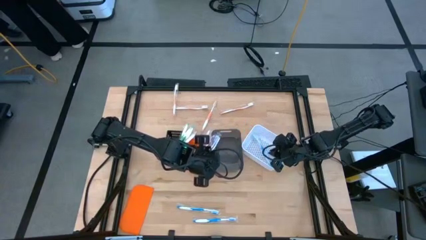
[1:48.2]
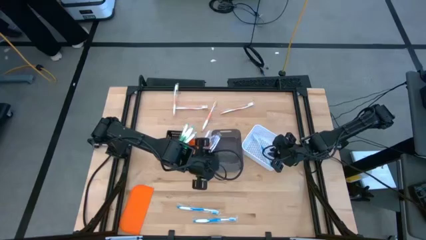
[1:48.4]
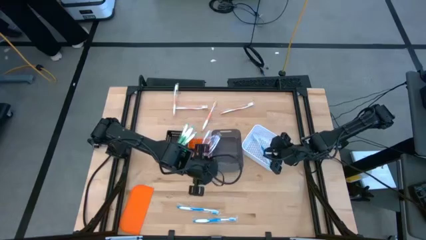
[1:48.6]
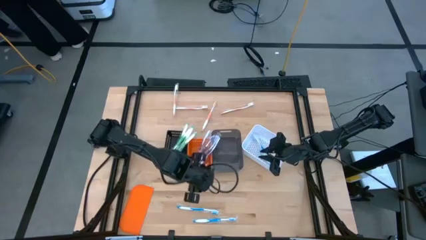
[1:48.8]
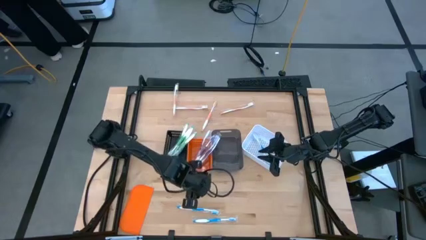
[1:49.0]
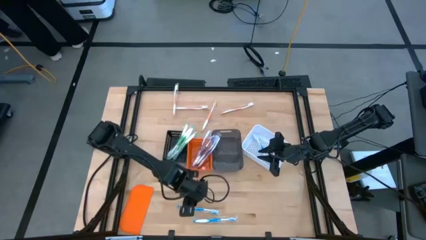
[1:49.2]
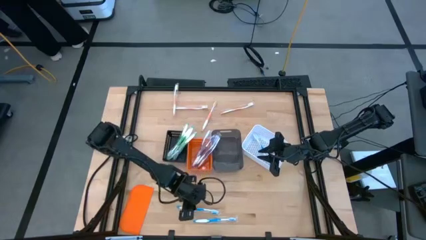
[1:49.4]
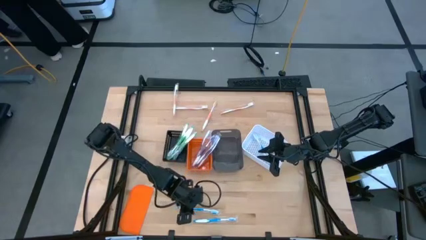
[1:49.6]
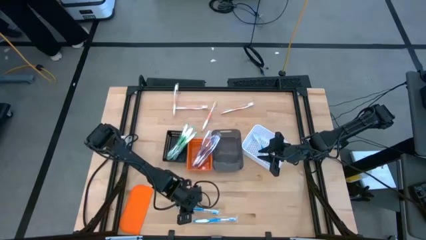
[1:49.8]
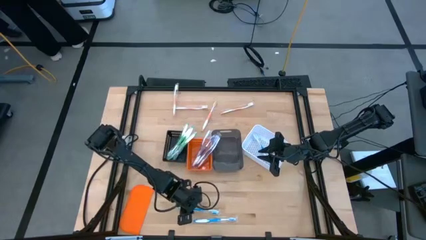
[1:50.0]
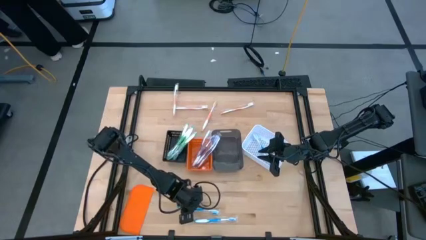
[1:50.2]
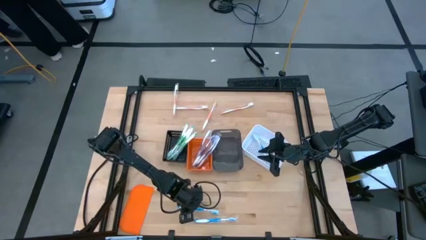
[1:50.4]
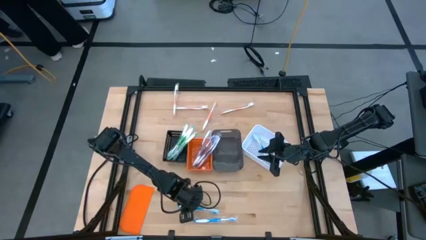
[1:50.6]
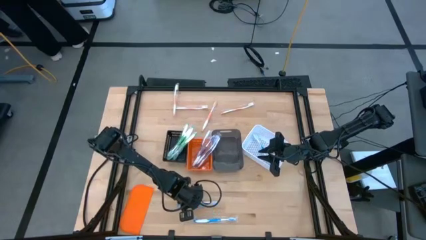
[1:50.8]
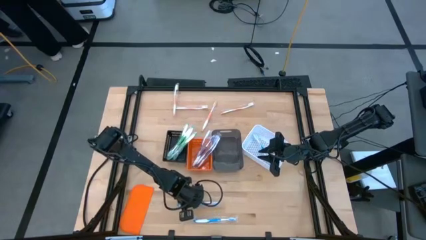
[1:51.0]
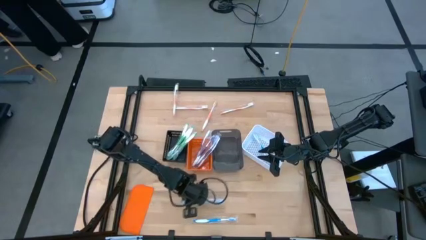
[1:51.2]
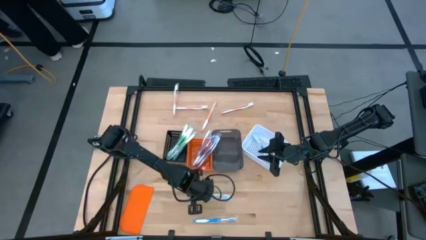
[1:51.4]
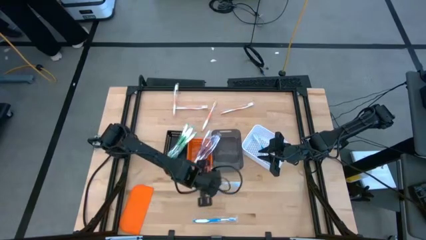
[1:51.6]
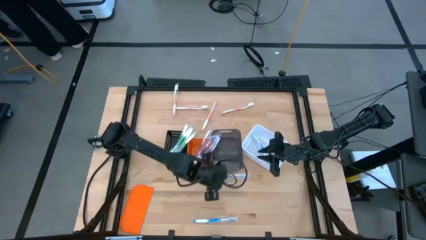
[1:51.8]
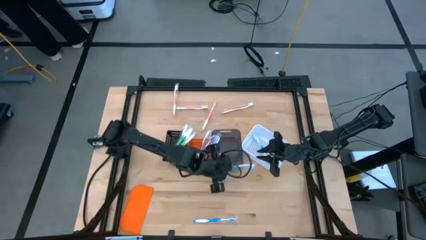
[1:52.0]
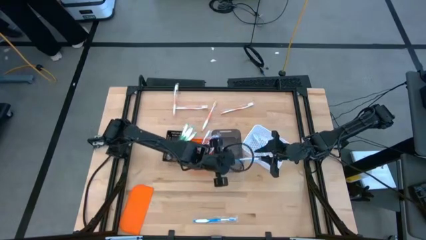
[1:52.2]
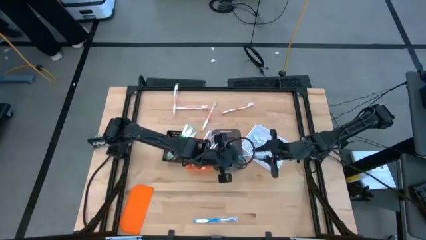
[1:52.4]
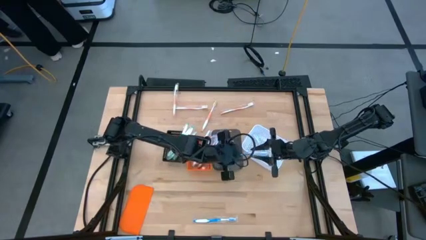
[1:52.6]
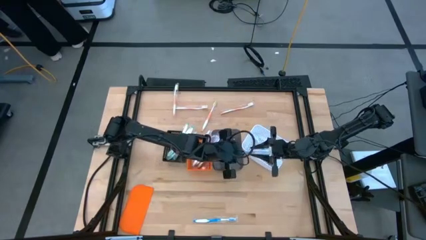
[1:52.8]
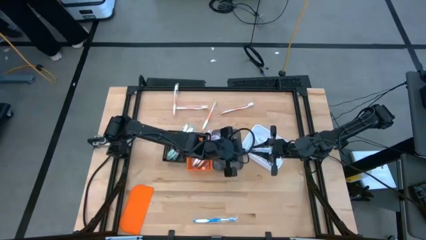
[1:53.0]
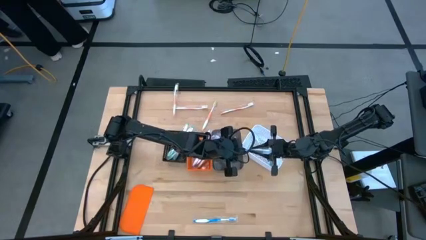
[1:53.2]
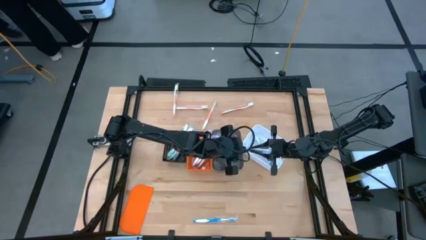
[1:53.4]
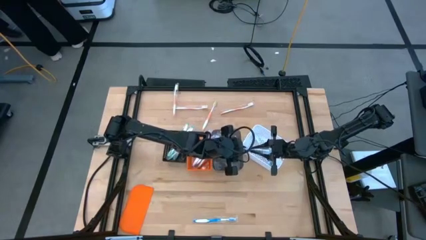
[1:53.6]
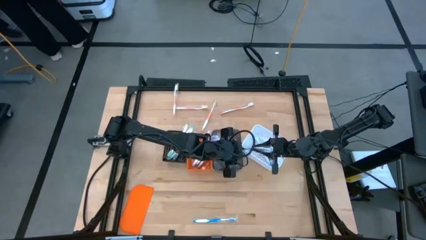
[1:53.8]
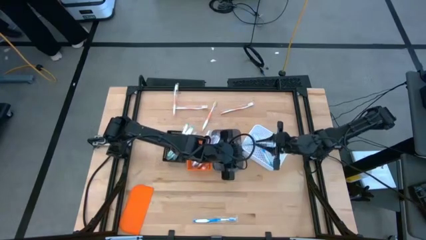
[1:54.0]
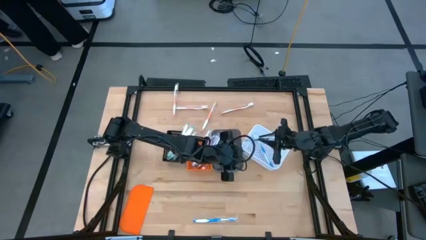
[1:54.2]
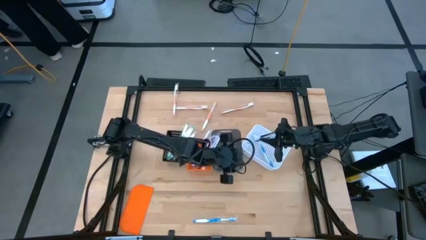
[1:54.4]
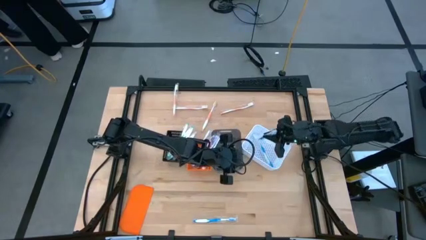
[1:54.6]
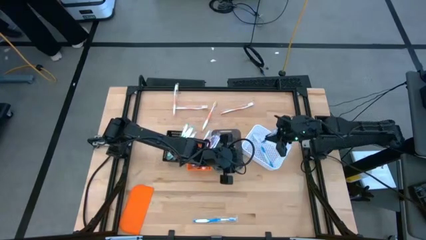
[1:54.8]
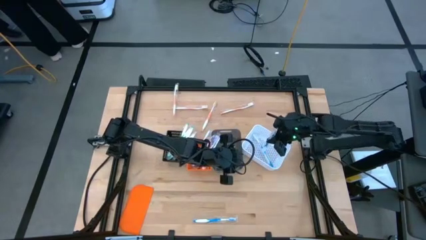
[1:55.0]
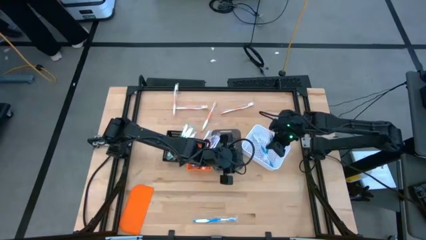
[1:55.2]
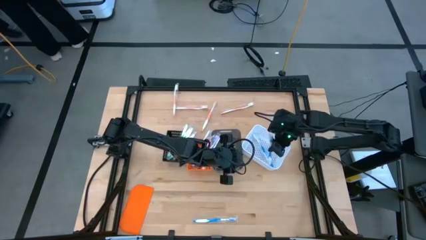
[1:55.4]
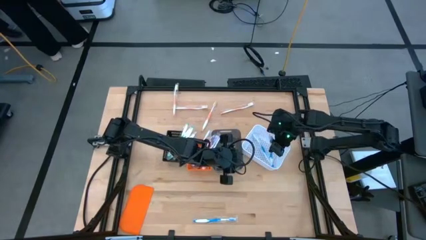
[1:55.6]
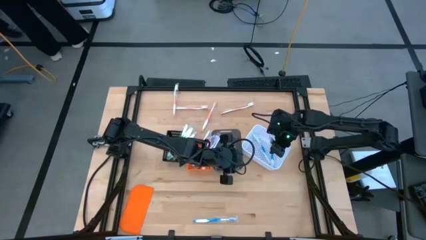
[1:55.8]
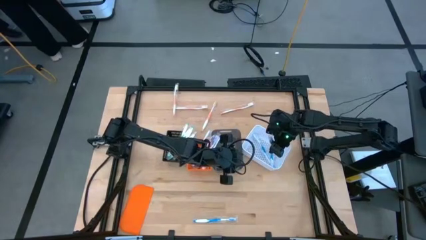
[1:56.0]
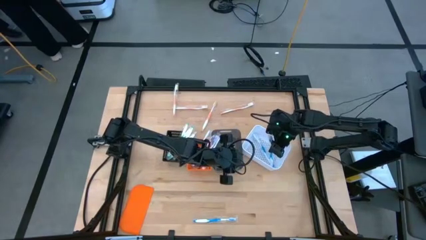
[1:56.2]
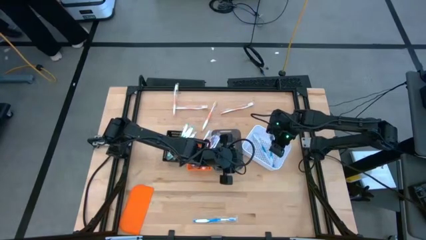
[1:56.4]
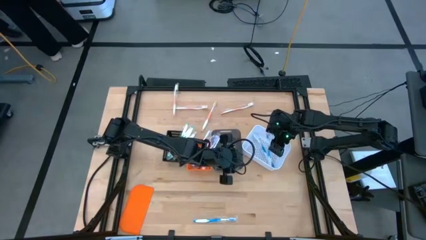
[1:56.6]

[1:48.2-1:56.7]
Task: Pick & Place Toothbrushes
Put the blue toothbrush into the white bin

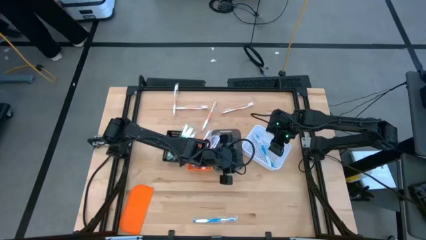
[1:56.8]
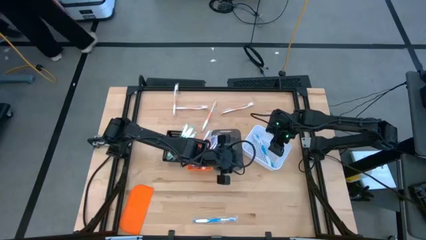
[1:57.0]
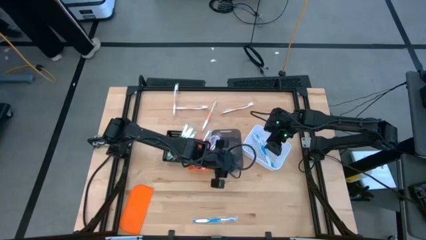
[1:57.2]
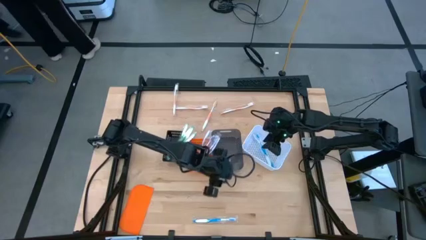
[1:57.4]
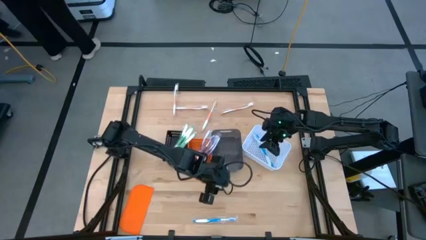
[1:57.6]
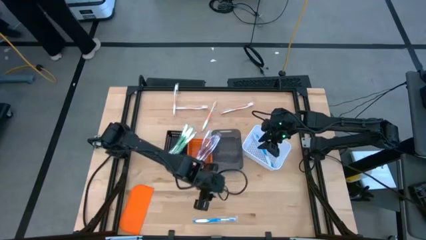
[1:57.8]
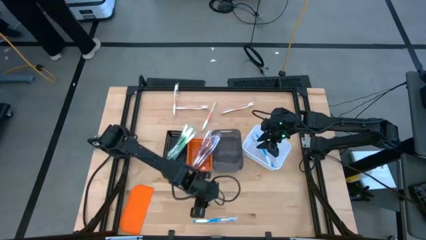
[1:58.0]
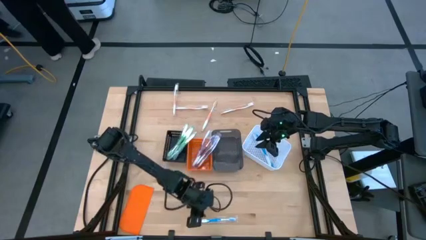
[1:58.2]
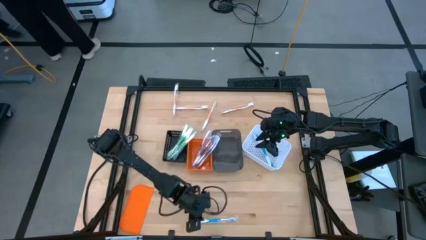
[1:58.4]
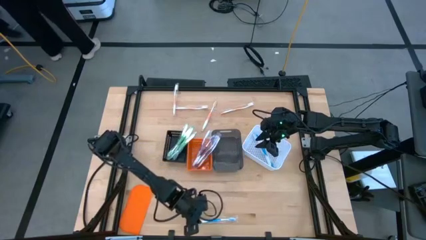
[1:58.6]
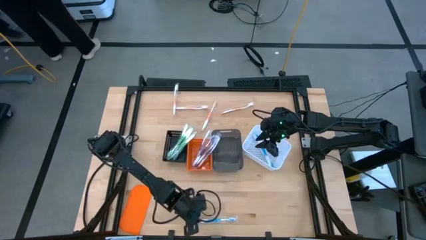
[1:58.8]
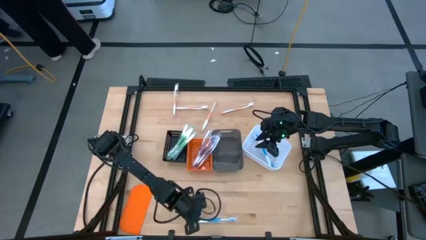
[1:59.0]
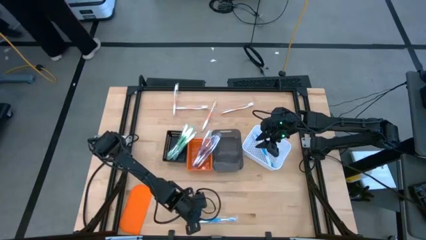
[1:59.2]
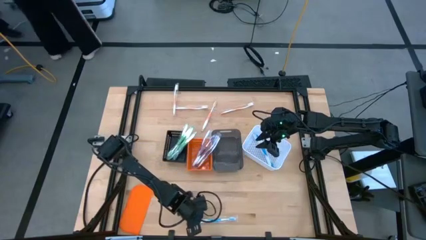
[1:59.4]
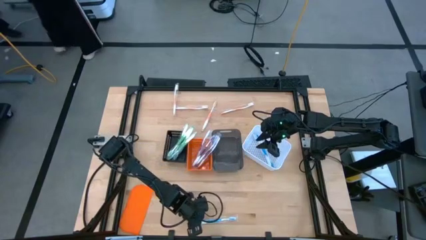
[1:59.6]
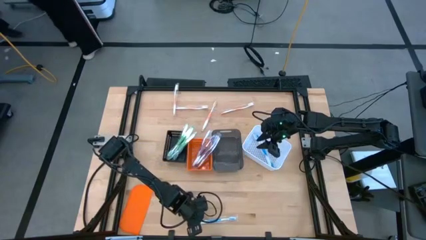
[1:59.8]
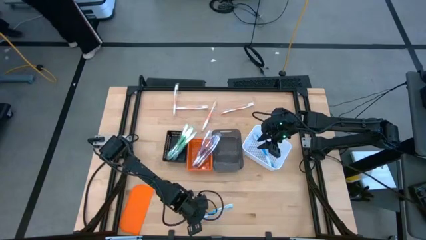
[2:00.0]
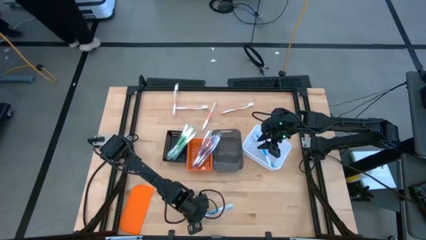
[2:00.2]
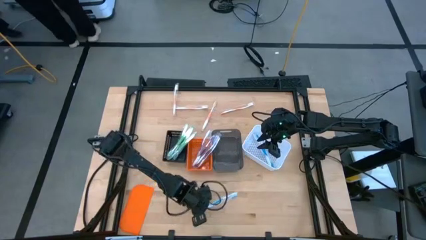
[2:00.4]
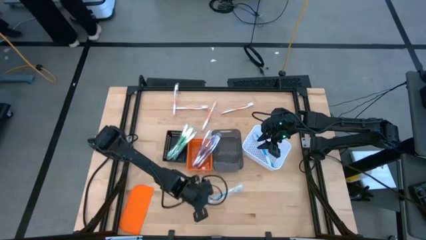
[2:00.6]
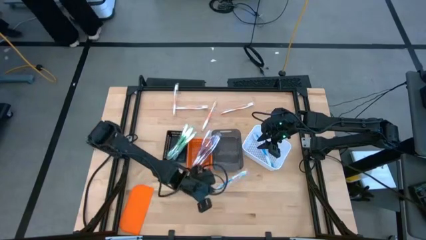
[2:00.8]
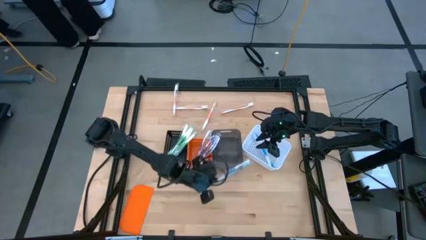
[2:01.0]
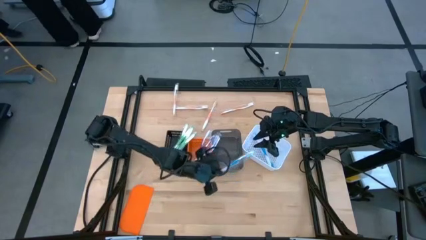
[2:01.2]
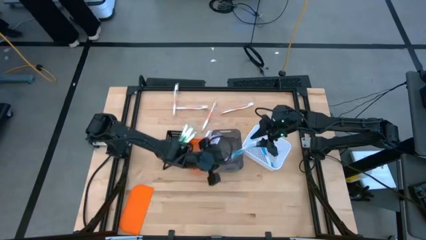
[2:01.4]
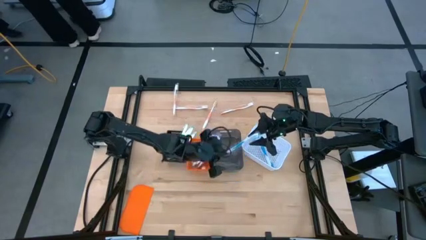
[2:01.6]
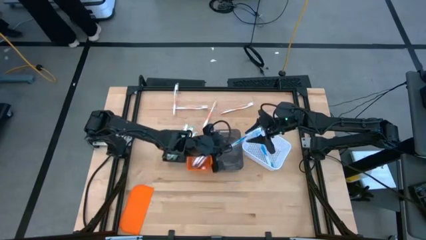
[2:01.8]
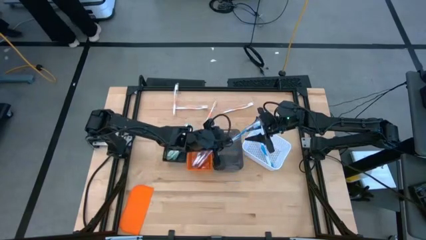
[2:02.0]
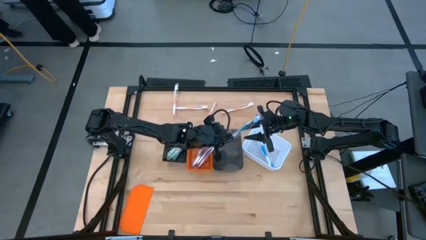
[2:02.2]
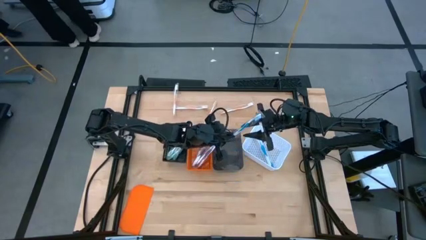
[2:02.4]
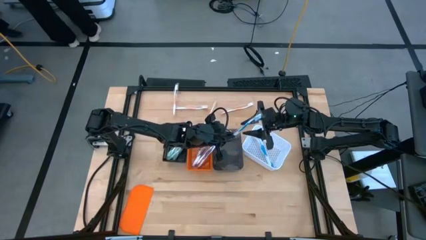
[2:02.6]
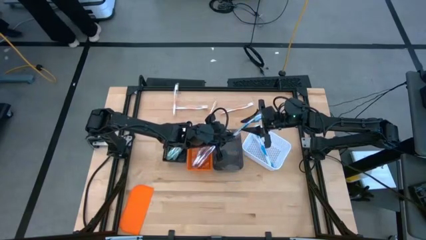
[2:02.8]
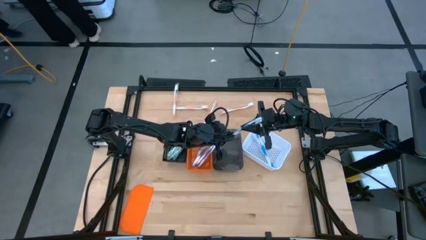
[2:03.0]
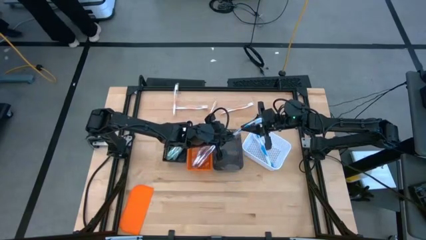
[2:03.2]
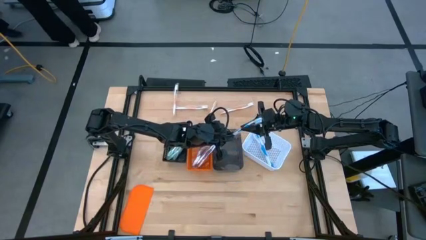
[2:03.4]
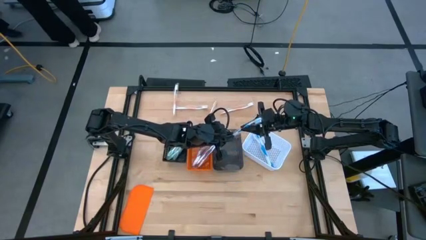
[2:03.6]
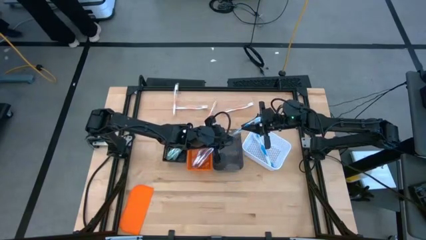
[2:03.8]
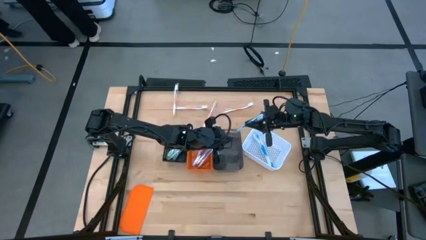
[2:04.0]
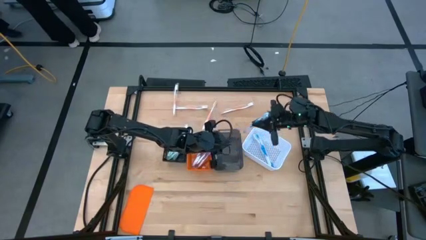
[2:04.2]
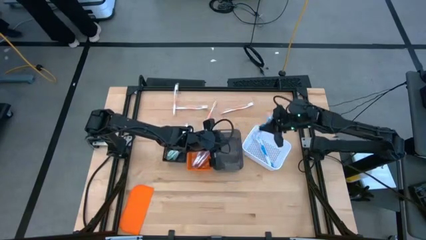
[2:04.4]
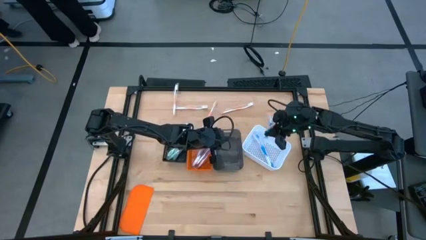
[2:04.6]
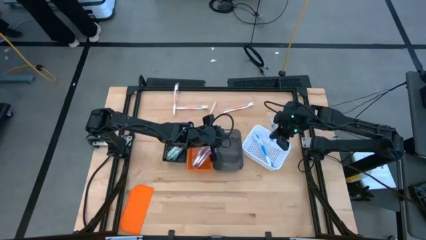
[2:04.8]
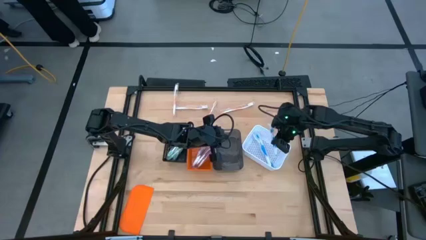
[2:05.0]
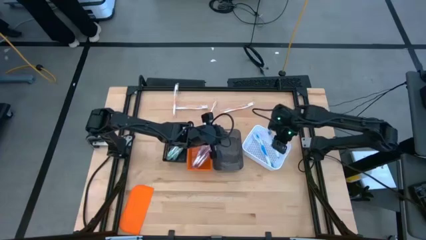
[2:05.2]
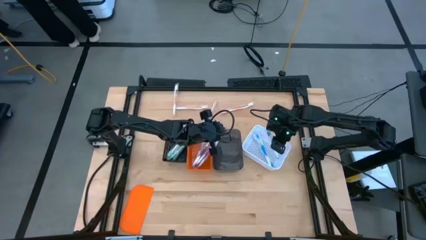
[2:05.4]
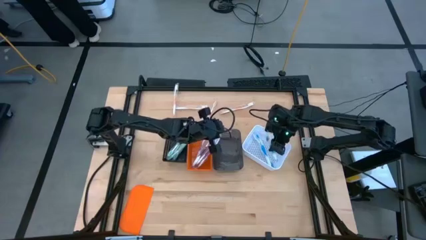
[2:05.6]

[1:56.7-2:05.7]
Put the blue toothbrush into the white bin

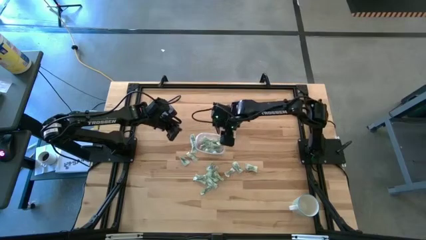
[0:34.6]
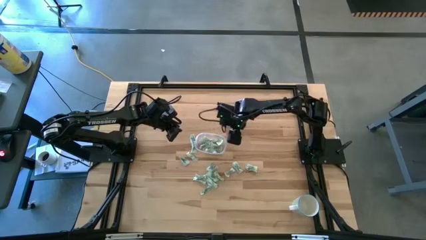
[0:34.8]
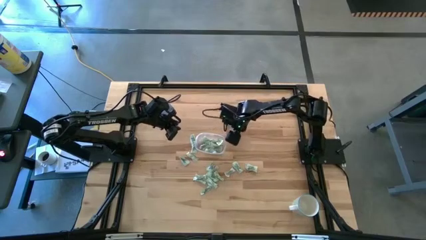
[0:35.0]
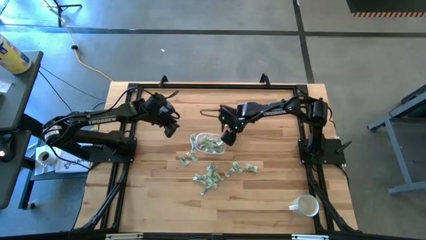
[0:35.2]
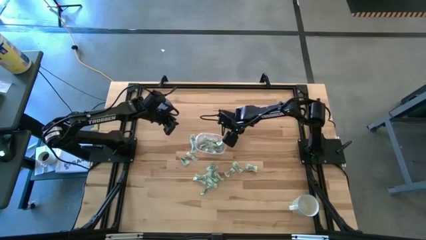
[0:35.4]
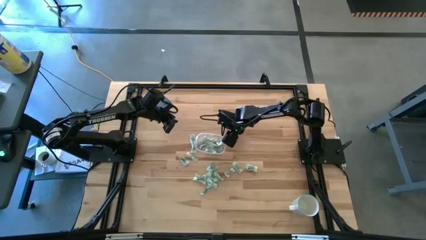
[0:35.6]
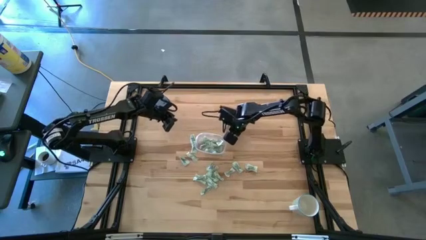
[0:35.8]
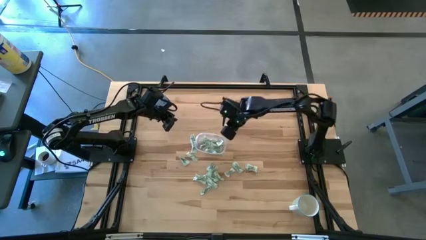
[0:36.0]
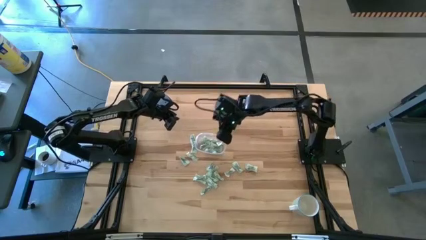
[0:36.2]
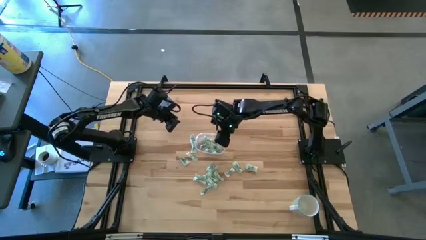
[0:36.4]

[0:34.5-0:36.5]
Task: Pick and place Stevia / Truvia into bins
Put the stevia packet into the transparent container
